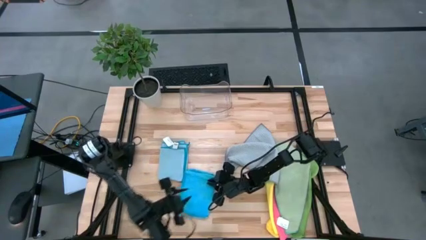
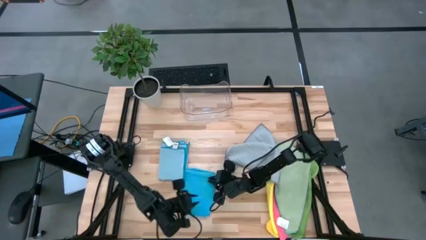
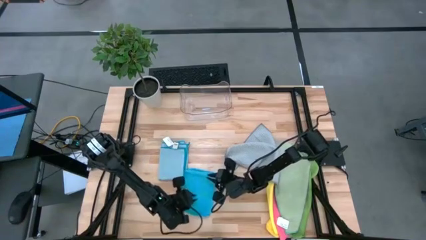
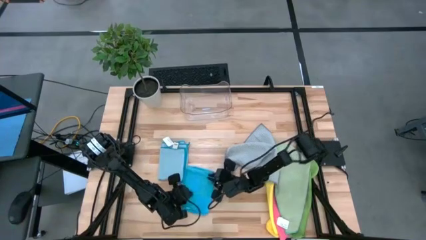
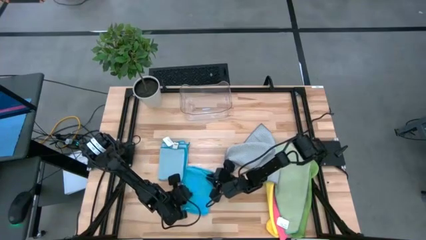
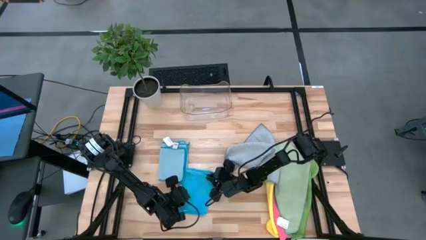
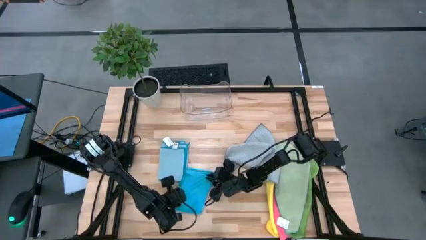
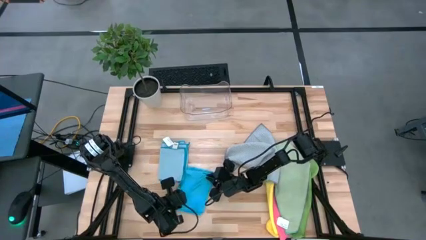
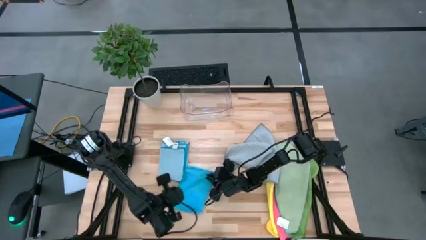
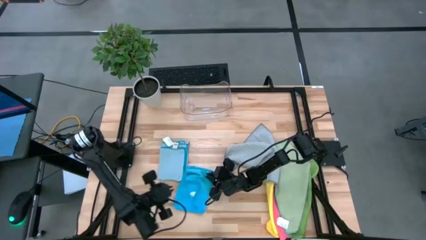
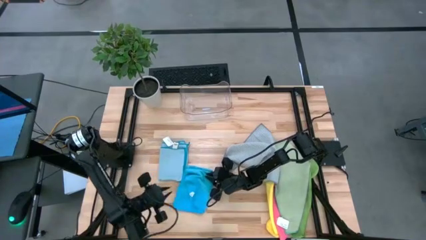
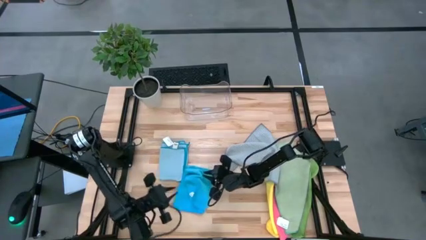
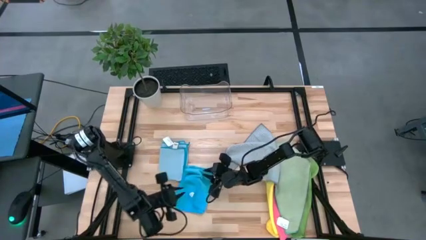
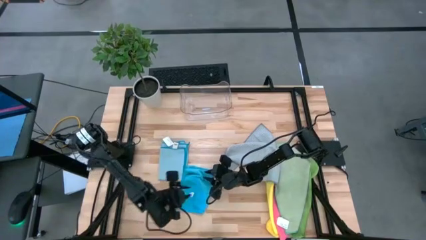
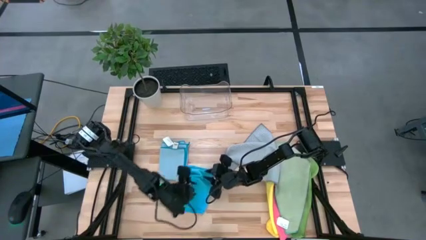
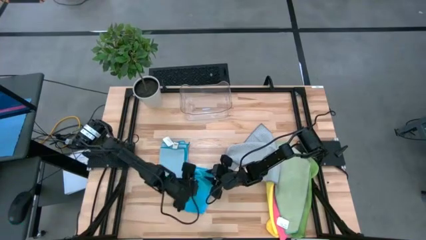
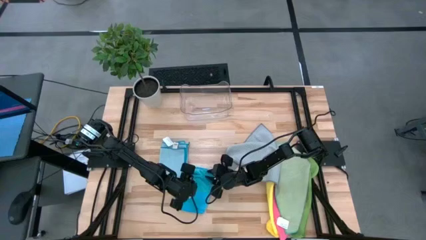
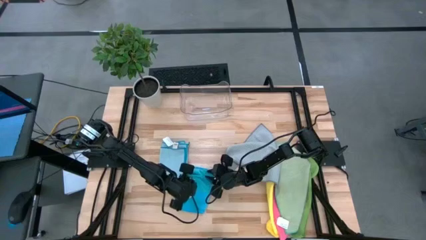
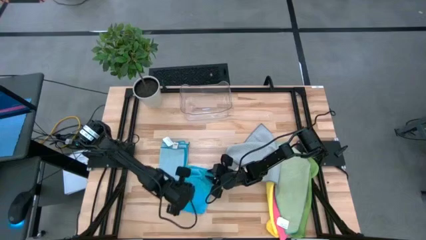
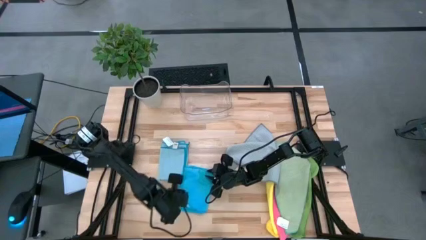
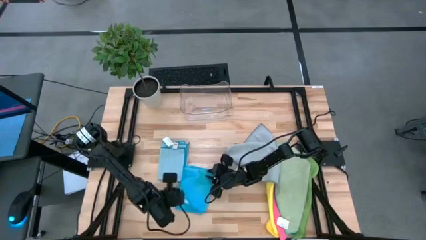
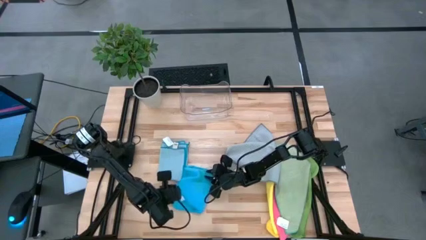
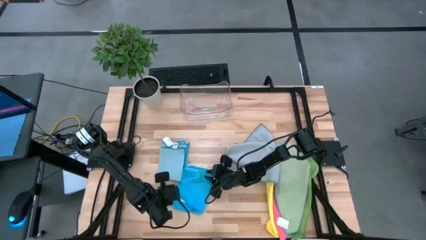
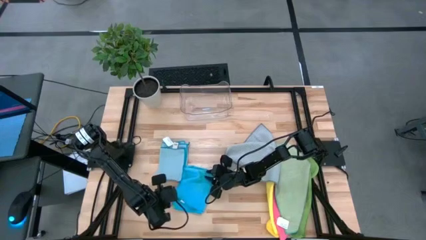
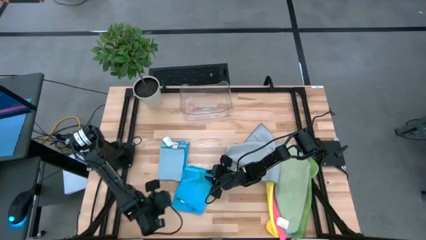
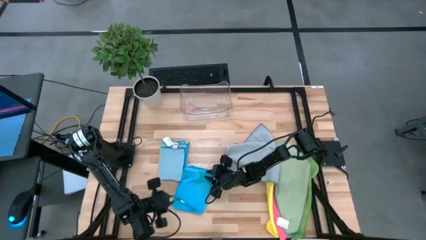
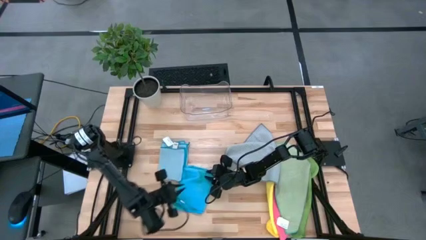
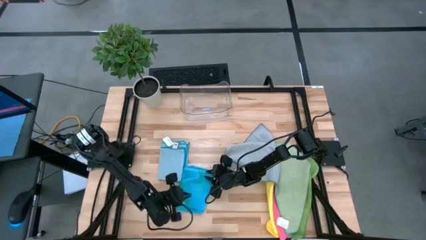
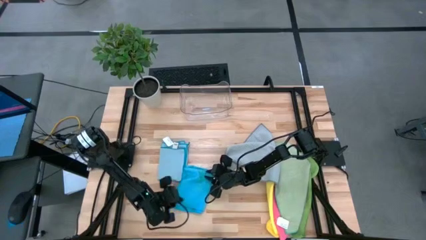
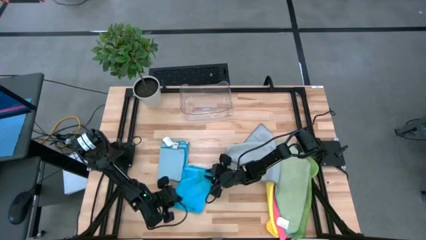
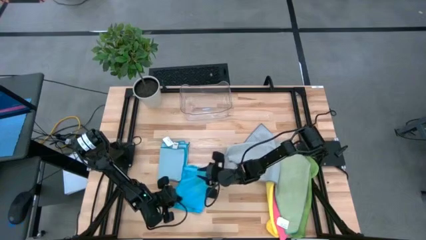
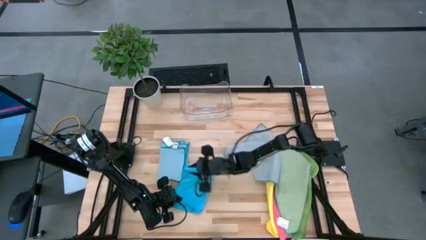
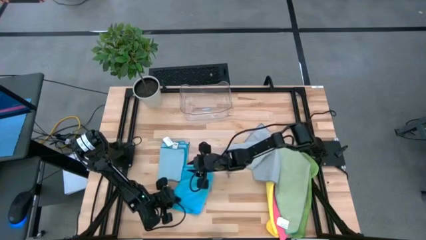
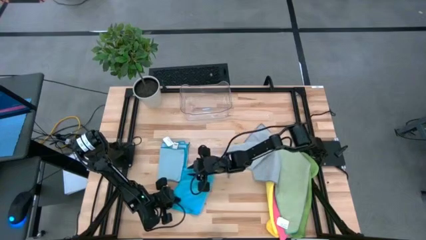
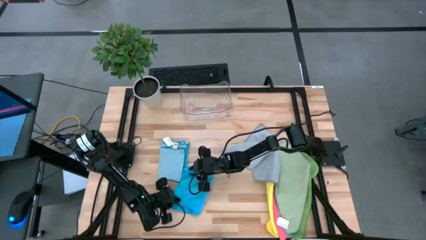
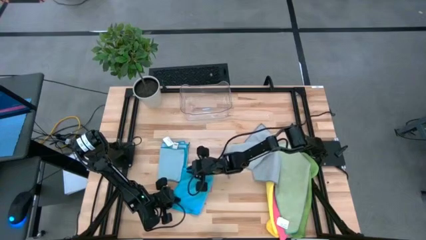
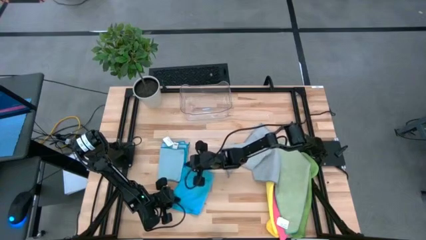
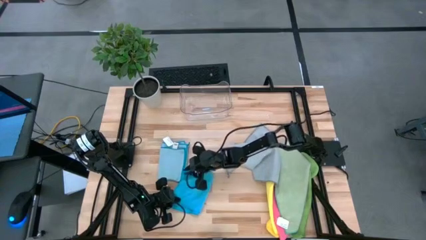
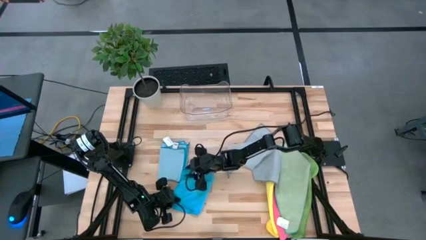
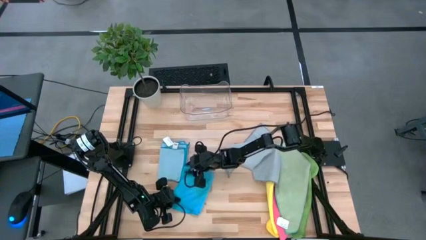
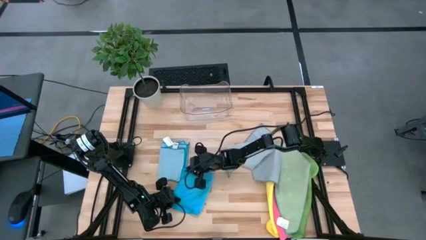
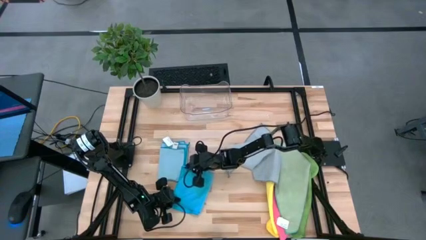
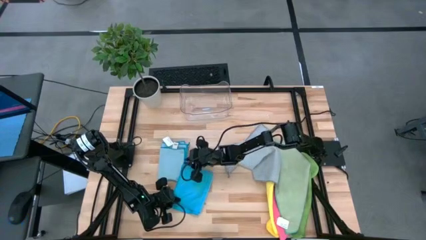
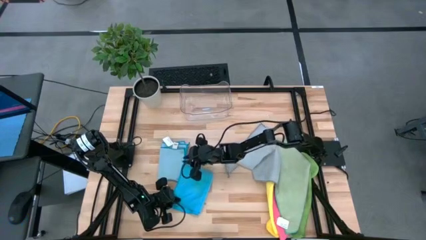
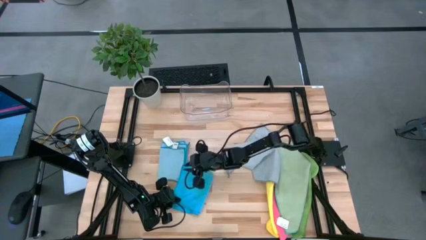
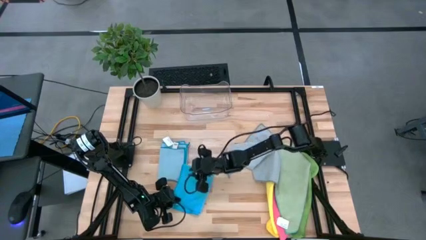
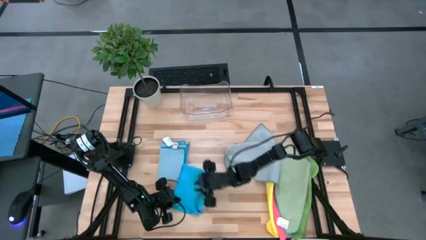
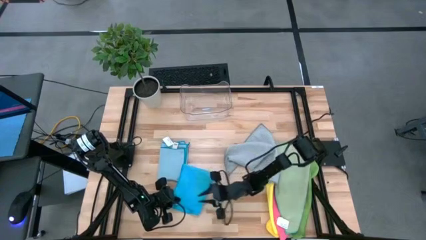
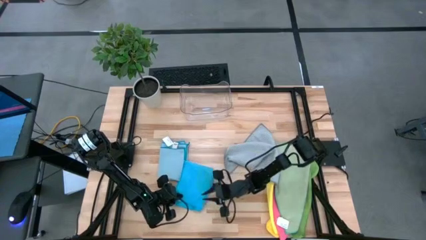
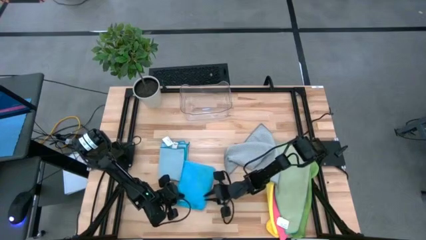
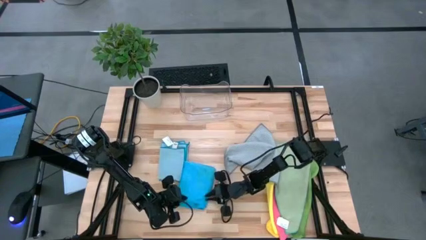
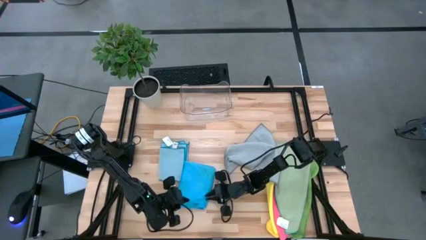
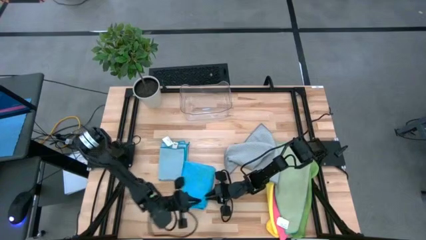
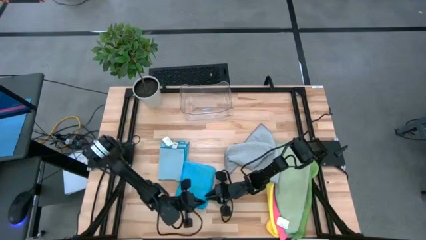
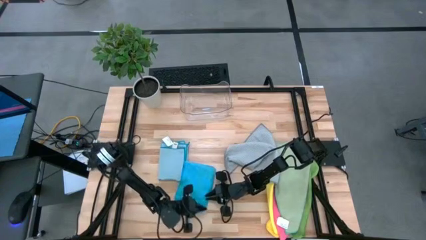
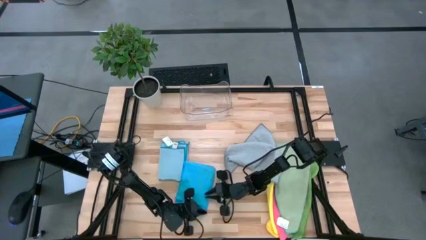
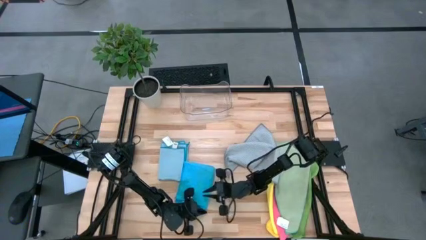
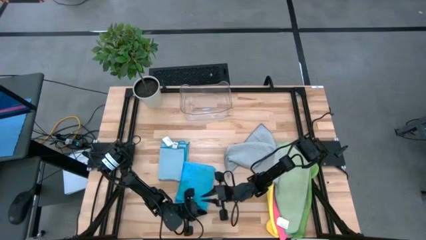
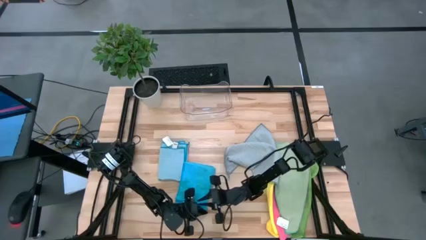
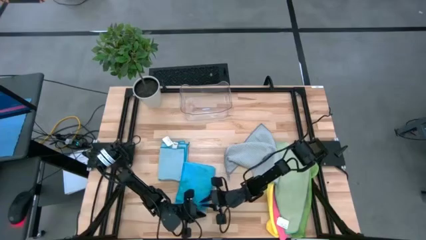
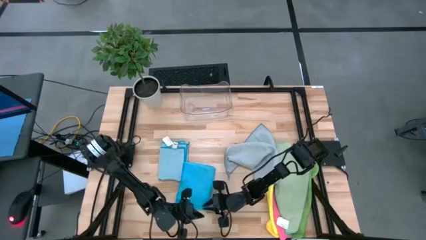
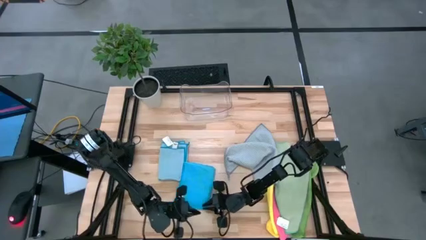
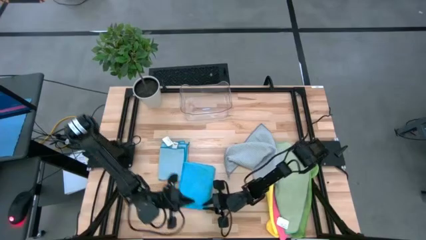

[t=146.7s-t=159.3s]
Task: Fold microfiber towels
Fold the blue microfiber cloth
